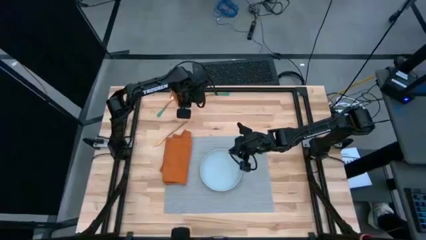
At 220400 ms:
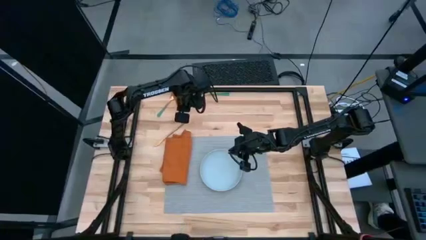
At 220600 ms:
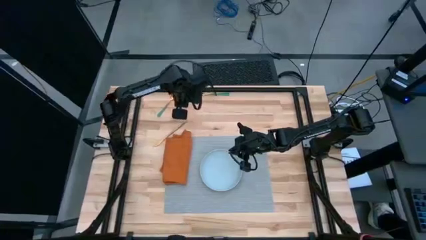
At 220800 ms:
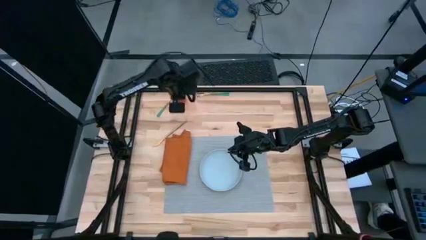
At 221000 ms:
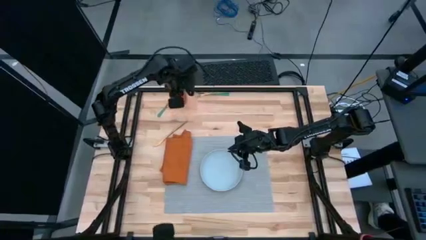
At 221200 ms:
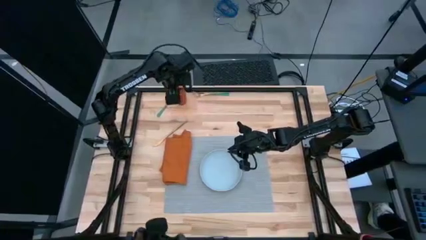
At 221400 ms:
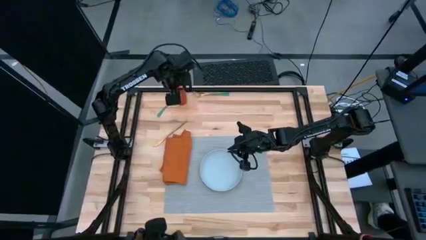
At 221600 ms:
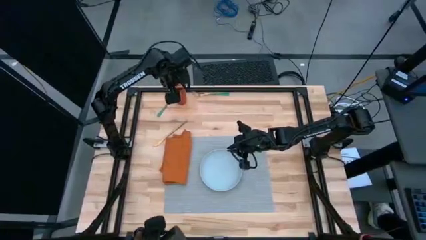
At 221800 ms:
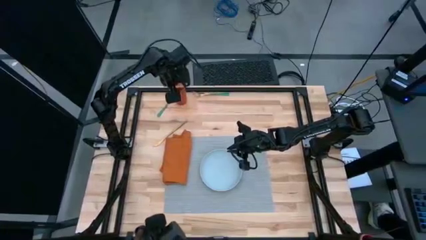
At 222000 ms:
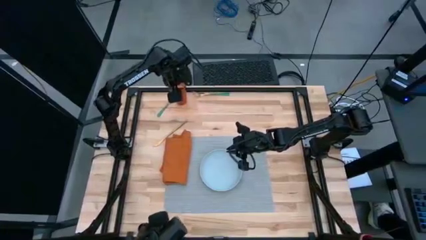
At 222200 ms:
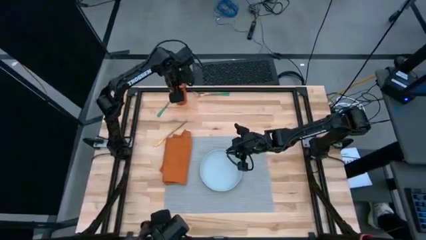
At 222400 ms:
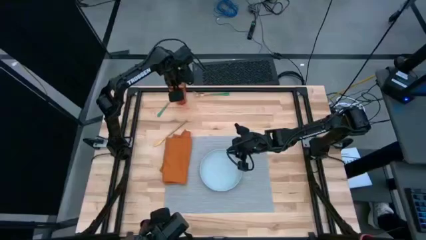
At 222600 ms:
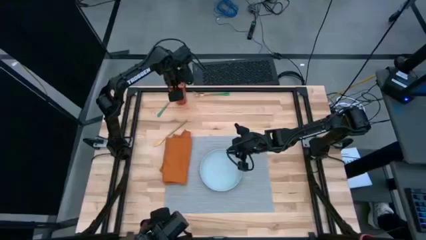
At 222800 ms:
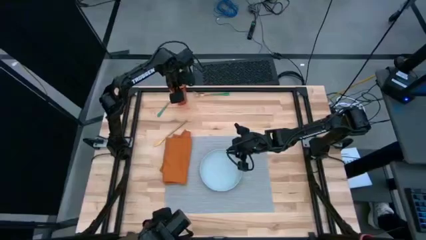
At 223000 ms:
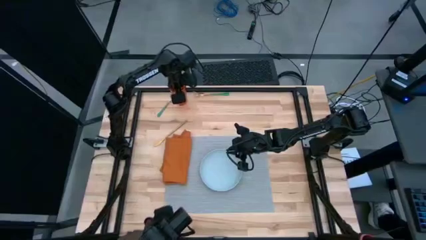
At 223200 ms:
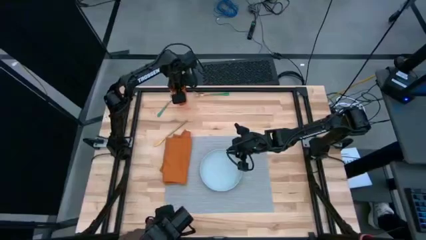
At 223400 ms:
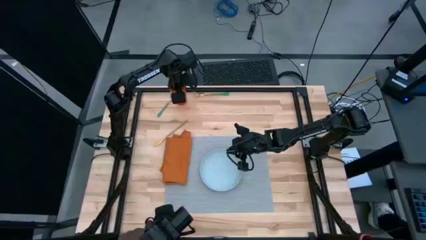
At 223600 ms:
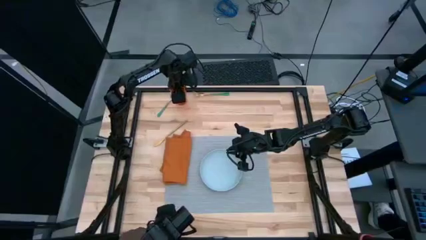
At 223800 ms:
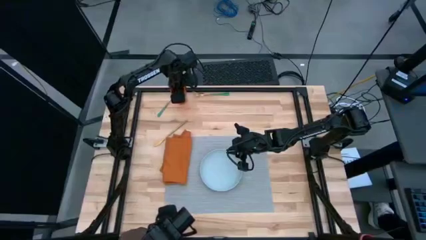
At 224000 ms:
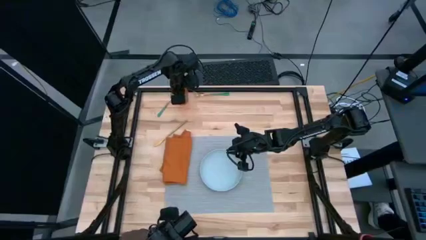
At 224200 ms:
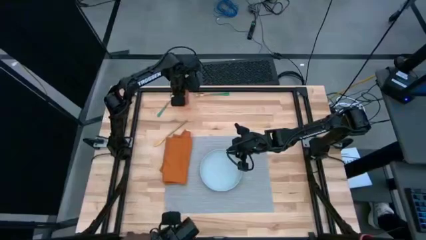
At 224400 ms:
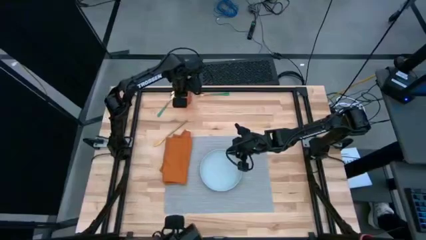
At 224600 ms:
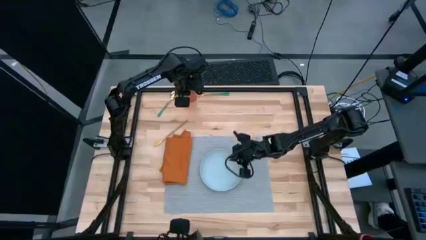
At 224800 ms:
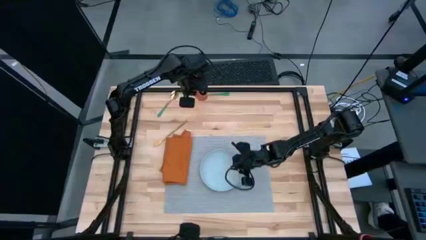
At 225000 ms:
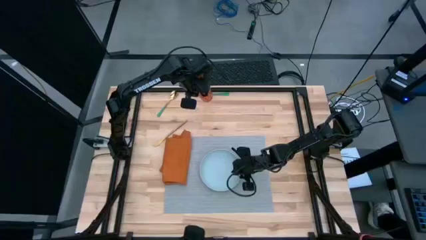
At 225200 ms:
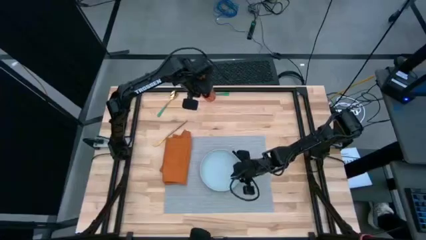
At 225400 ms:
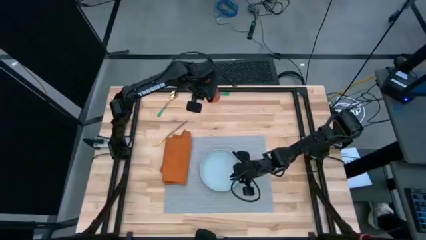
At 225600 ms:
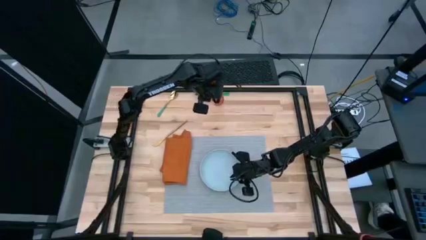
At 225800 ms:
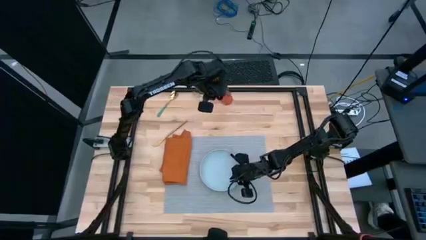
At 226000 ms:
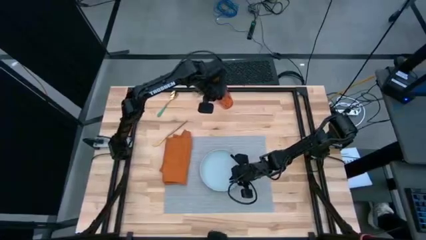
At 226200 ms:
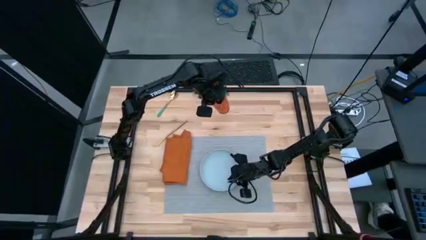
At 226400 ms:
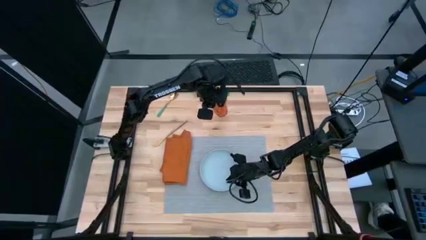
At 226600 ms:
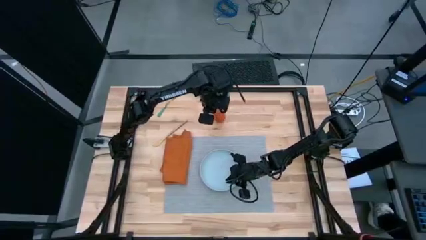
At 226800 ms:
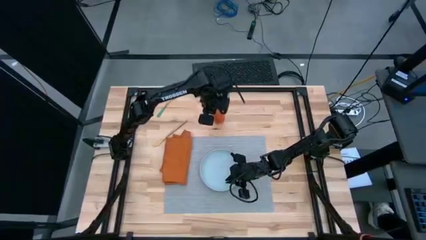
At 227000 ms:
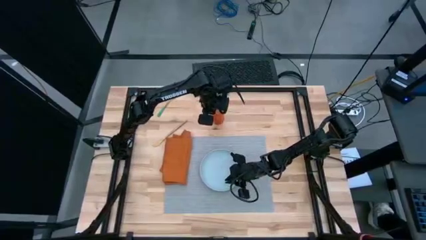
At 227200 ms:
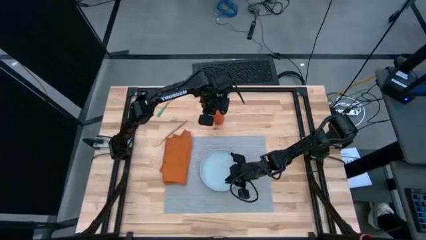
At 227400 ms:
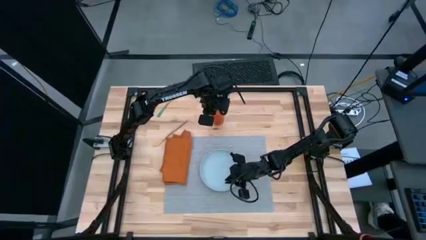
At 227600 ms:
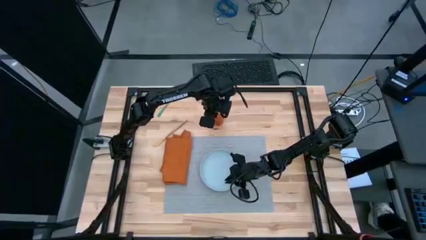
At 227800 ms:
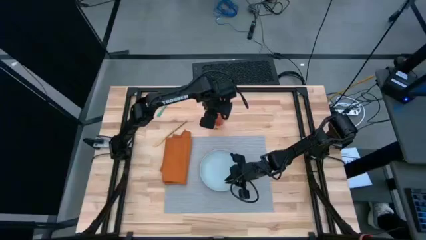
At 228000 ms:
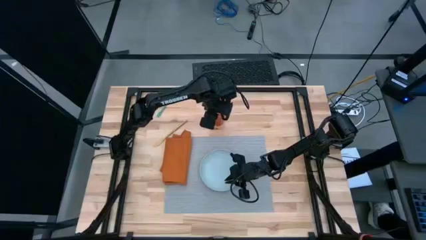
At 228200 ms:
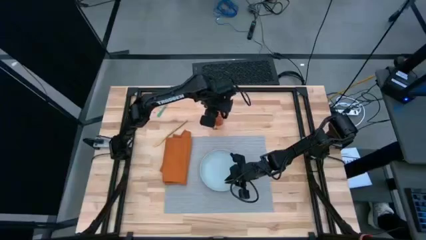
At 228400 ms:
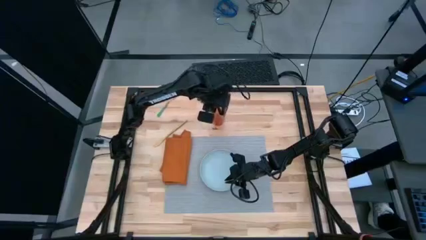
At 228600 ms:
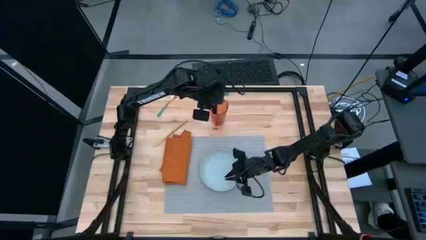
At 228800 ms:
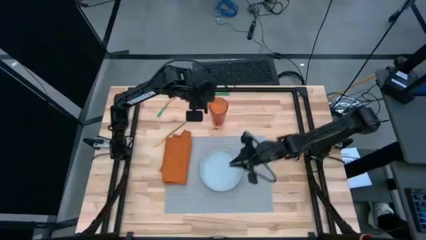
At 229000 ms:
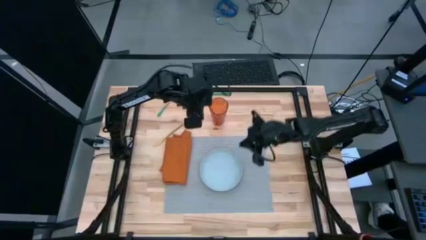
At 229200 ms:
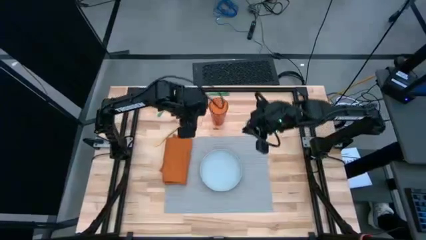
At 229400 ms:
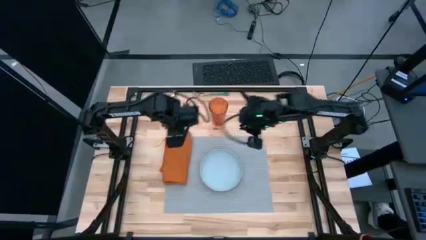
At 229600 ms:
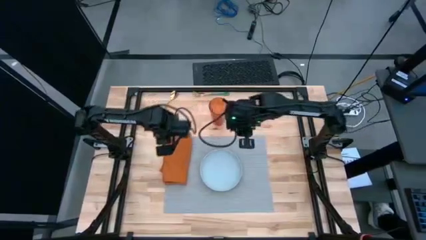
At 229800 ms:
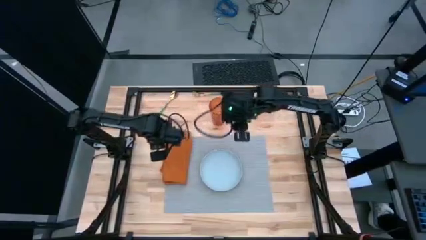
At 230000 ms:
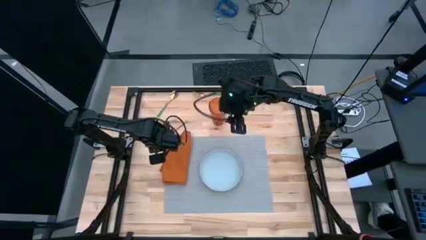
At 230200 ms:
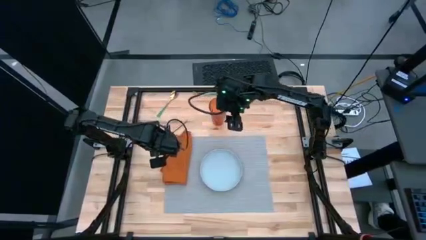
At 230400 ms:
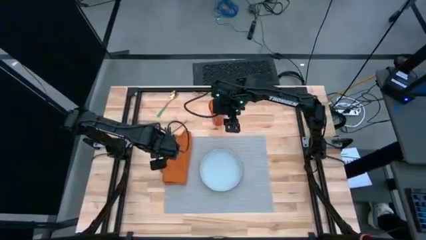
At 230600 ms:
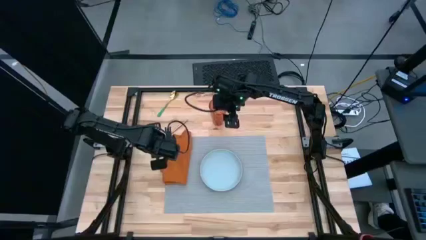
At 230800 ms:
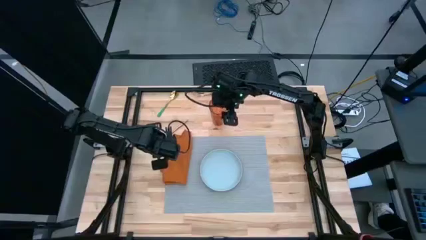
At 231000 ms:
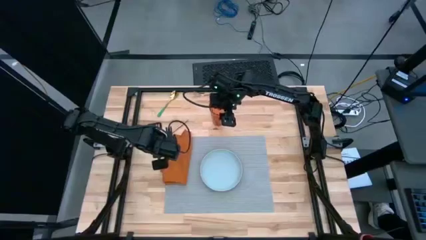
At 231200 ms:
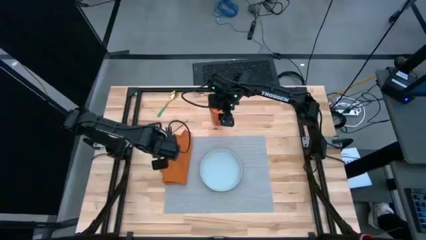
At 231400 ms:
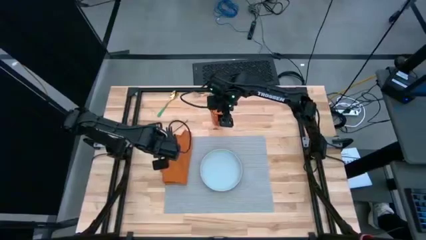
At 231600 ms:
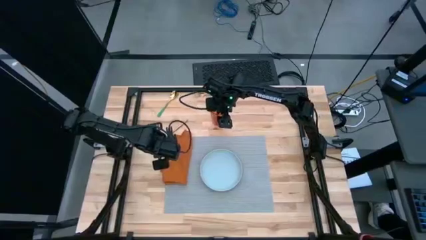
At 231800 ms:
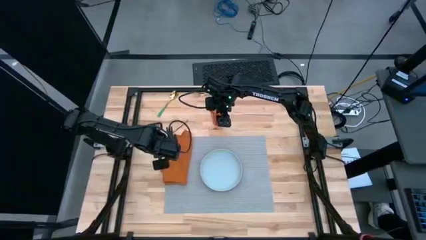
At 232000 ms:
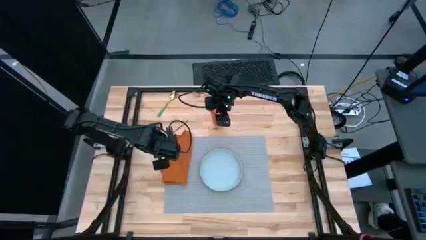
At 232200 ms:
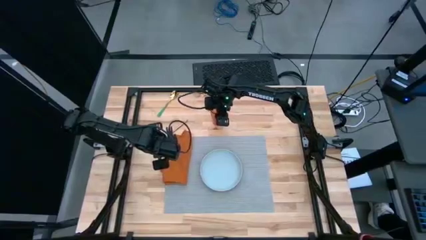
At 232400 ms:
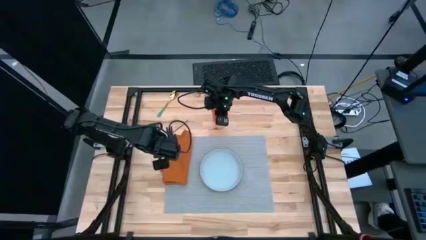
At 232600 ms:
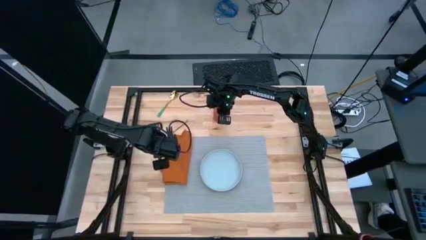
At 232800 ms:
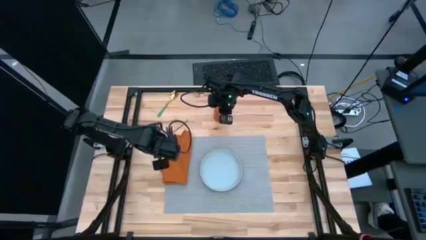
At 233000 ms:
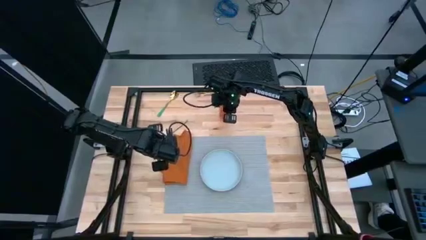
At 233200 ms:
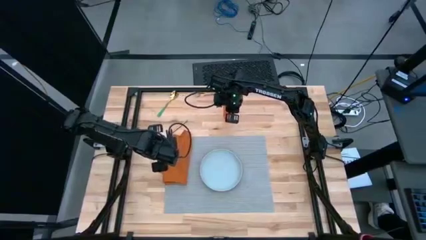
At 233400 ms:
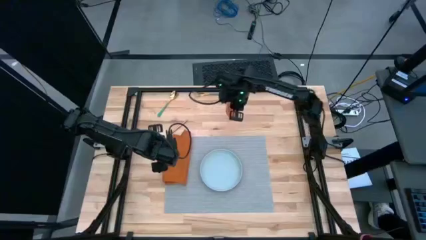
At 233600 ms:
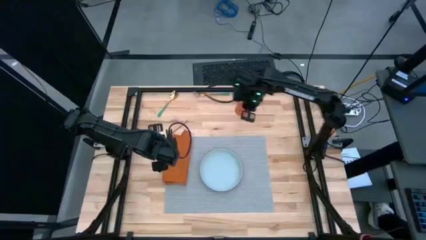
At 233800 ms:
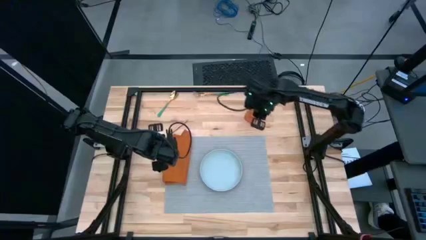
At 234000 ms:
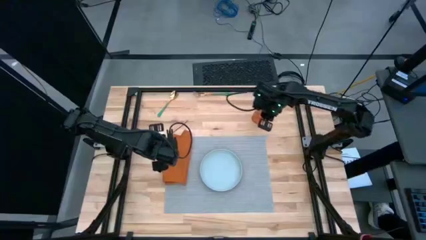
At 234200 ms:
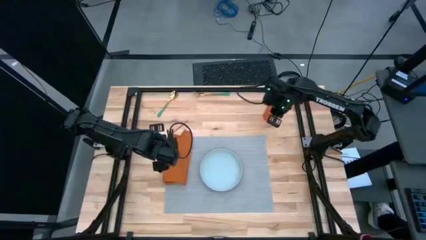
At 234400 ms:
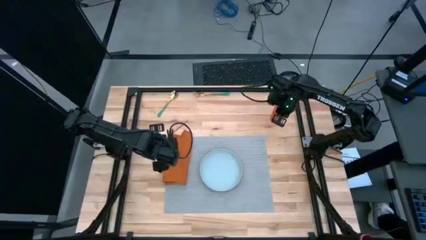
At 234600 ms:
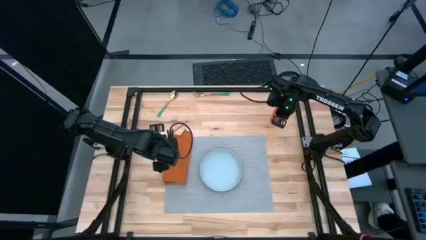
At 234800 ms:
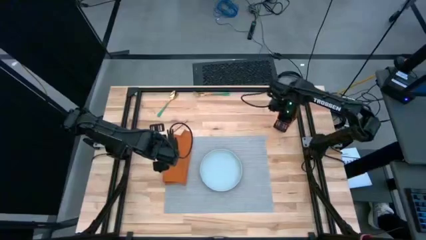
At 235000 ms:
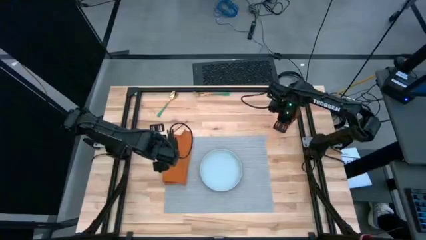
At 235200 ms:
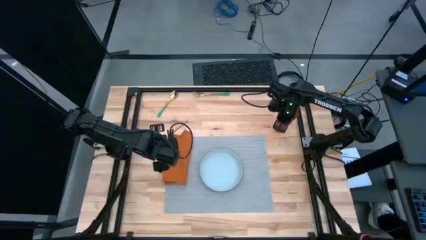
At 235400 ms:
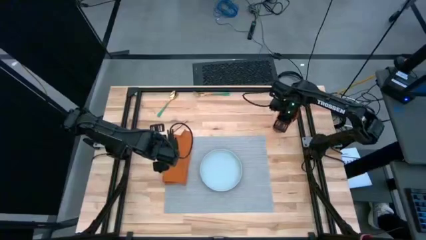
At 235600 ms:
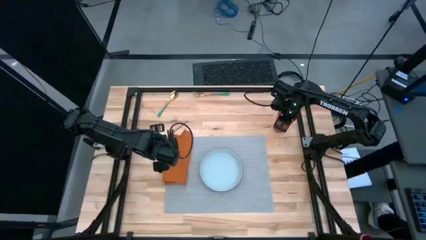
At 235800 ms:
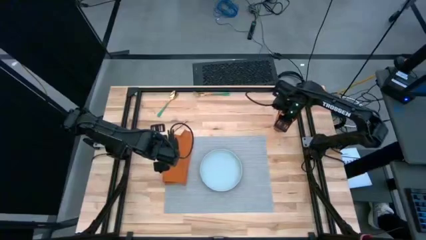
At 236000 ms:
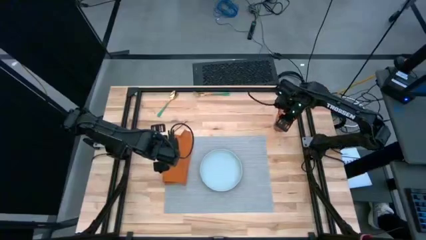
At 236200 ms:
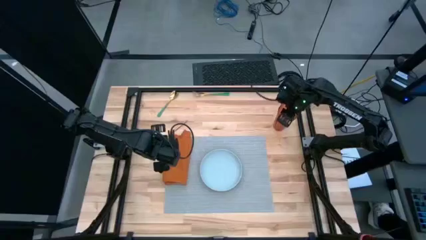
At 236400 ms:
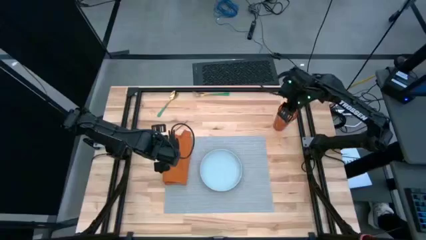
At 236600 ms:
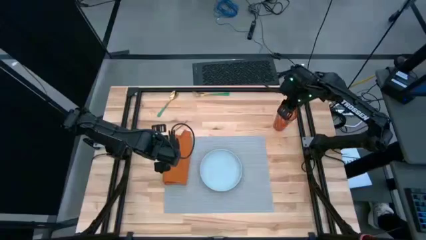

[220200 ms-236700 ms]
Task: Set table place
Put the orange cup on the top right of the table

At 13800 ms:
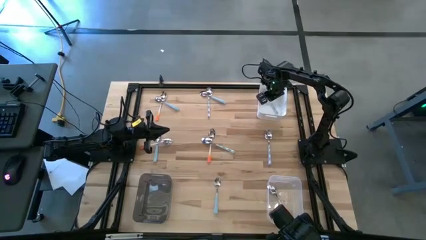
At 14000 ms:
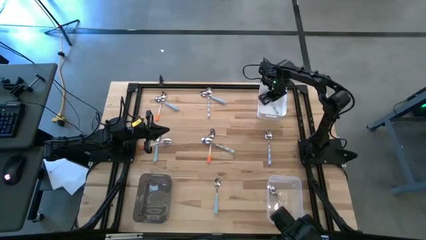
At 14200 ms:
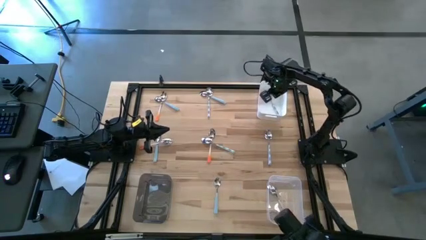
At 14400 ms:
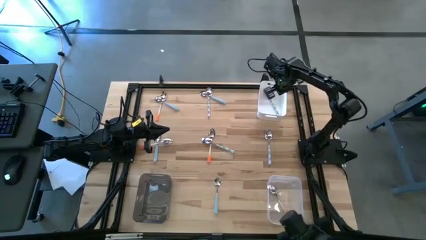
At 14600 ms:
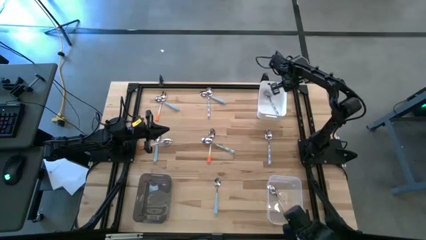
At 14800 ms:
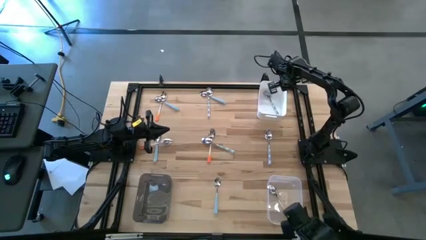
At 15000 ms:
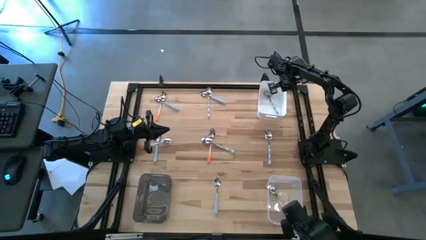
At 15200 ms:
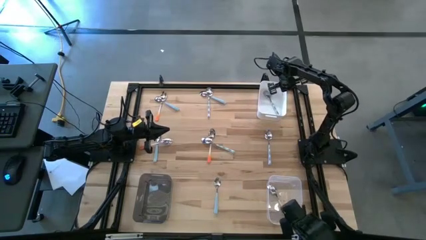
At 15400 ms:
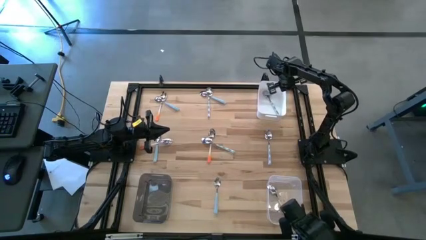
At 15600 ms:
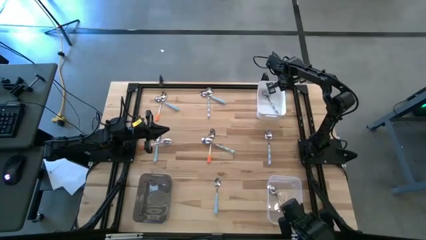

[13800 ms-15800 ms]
Task: Sort silverware by color (type)
Adjust the white bin
